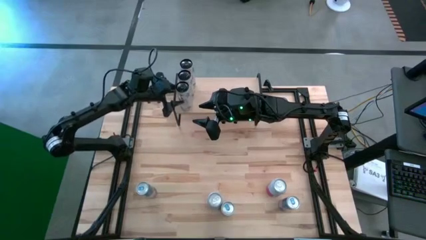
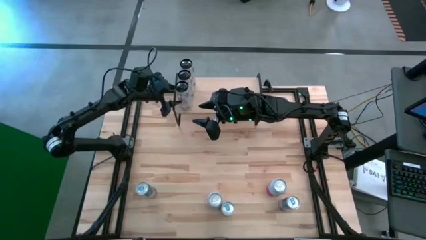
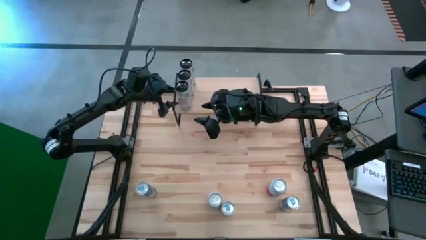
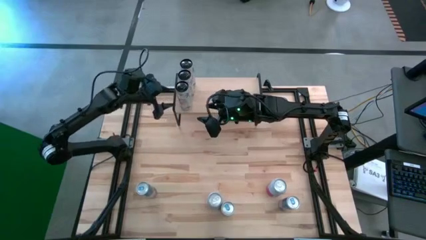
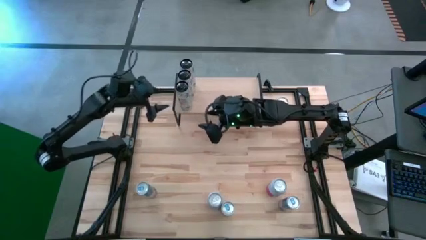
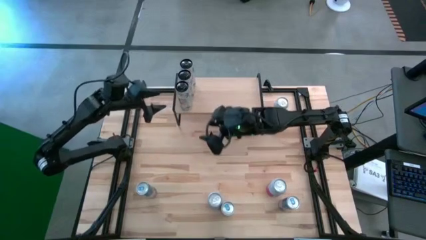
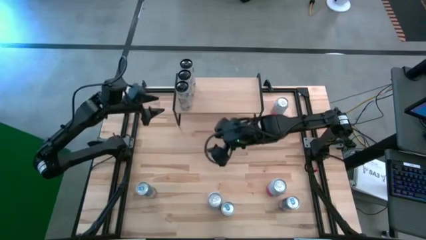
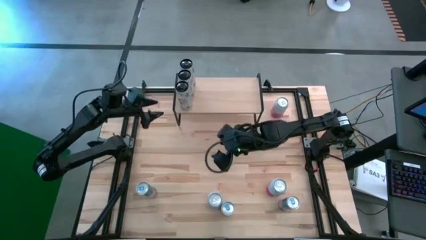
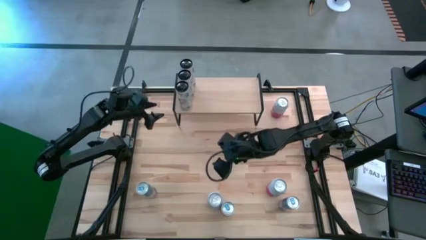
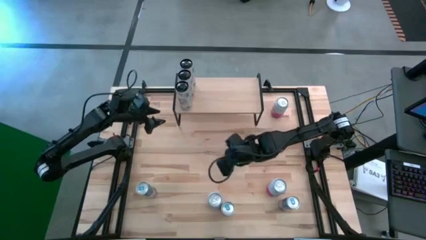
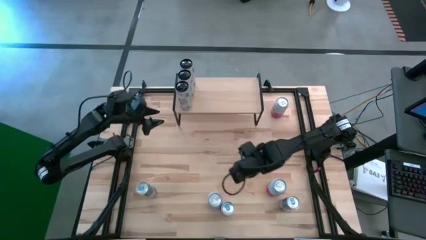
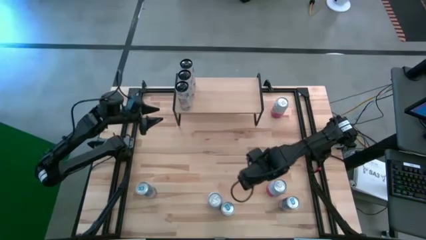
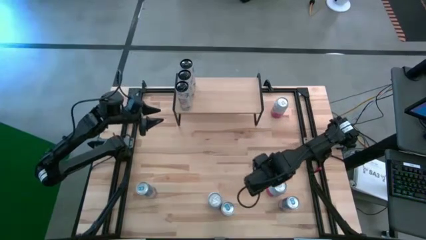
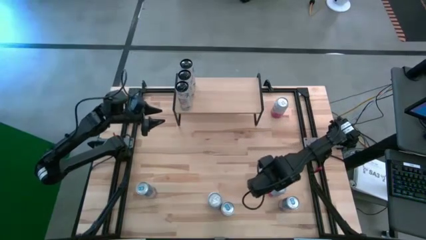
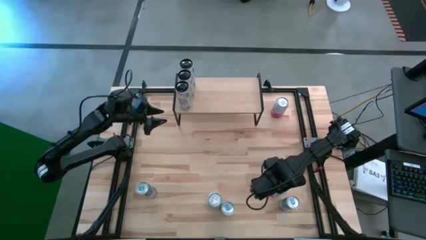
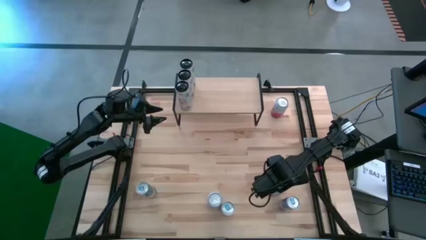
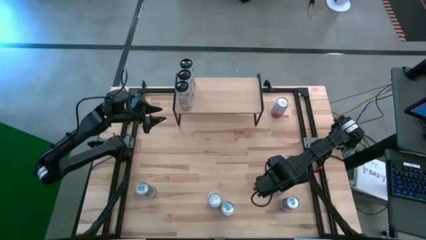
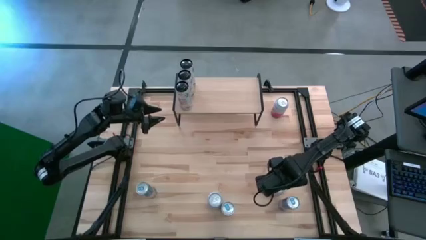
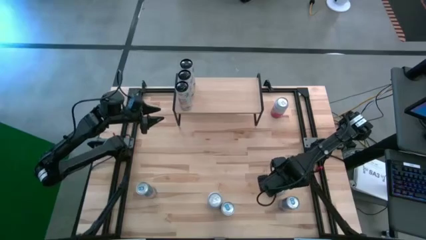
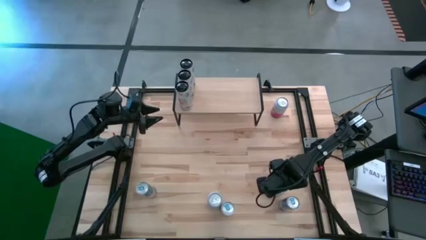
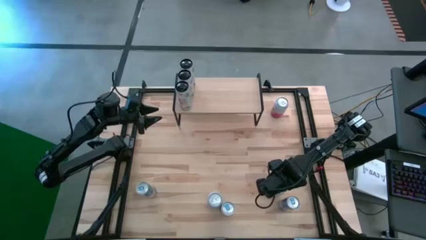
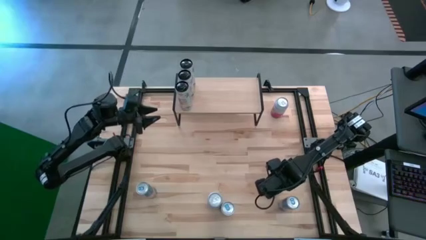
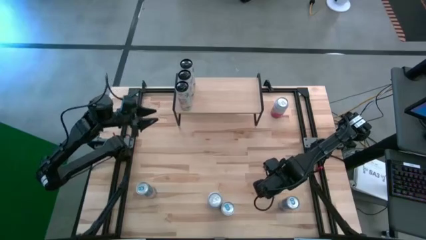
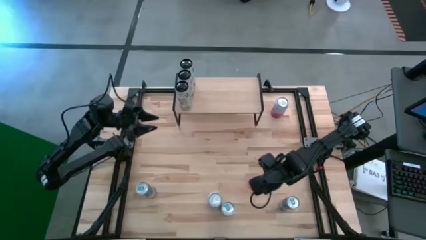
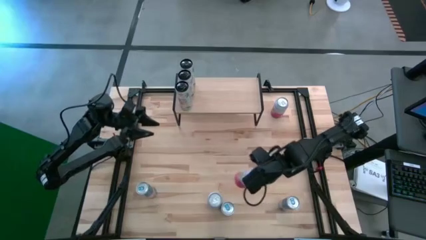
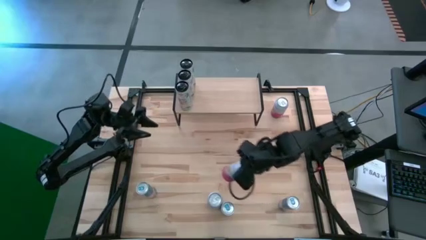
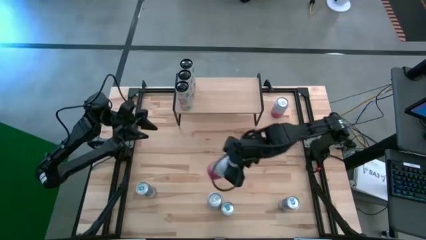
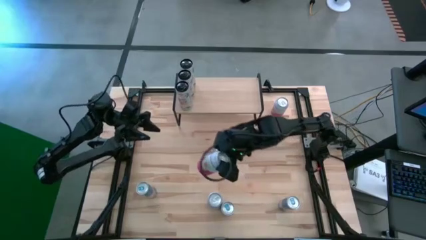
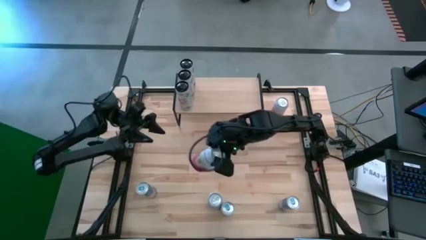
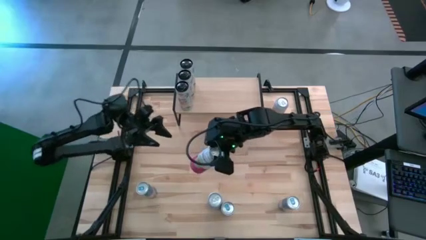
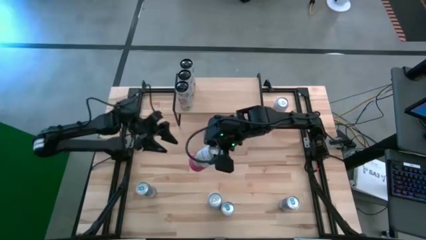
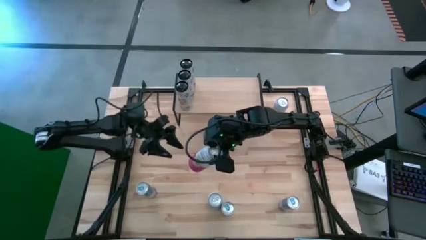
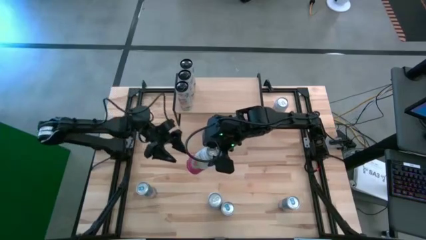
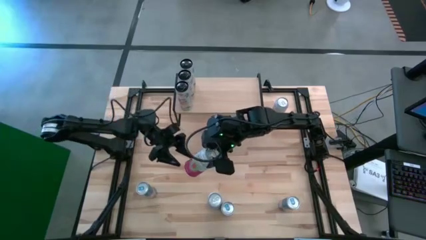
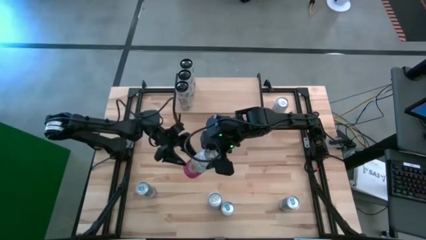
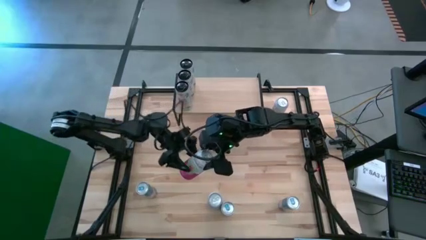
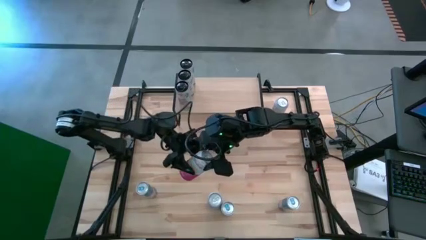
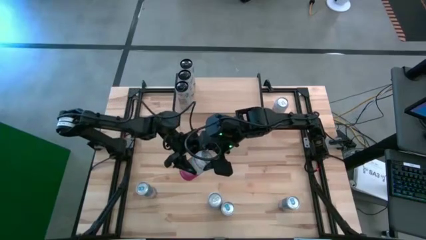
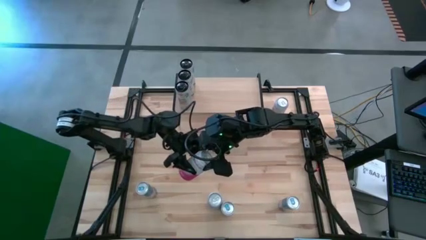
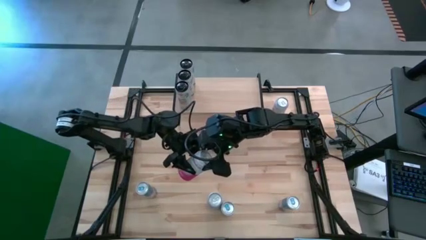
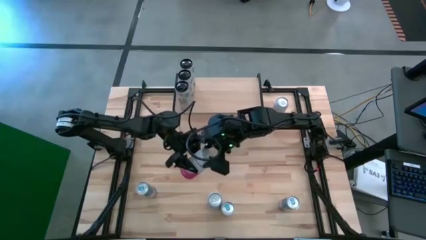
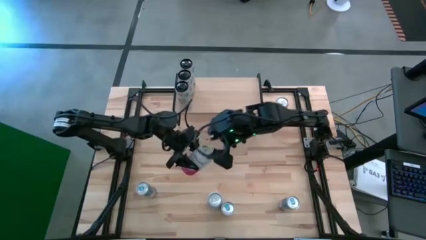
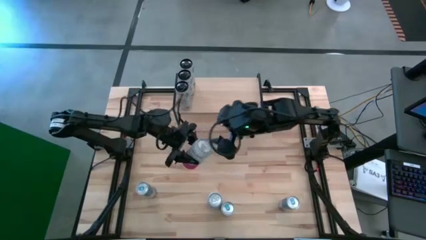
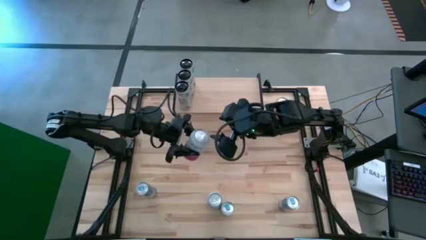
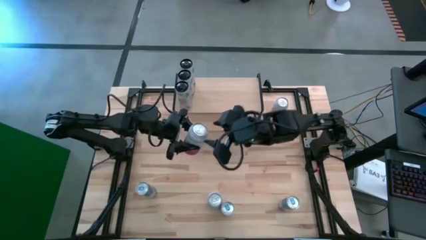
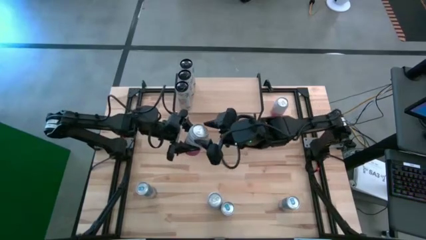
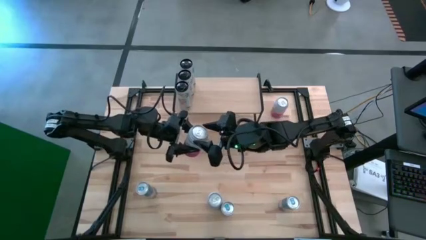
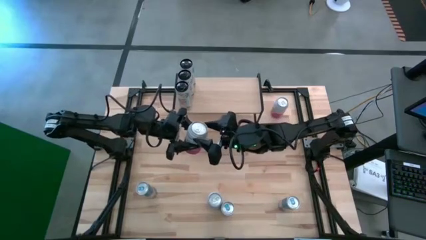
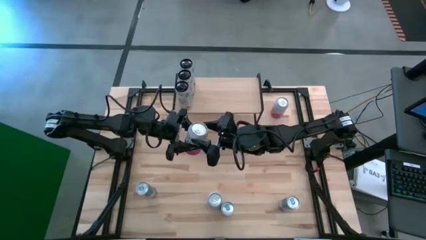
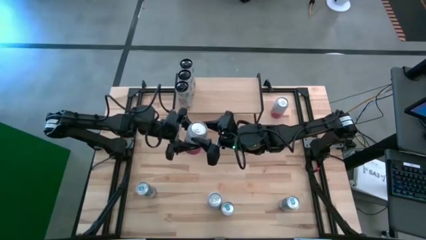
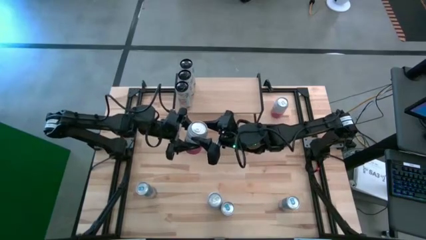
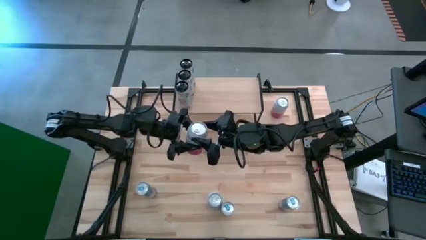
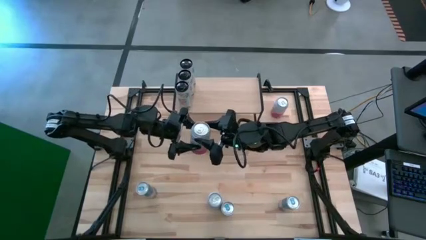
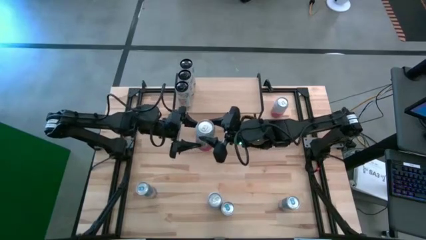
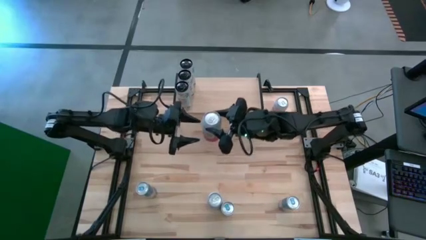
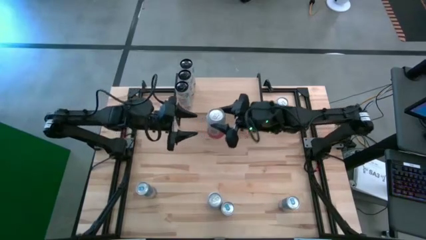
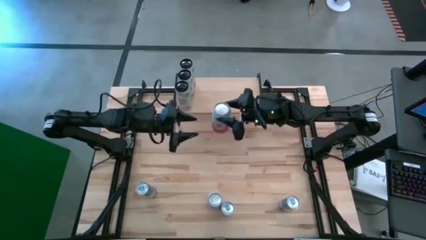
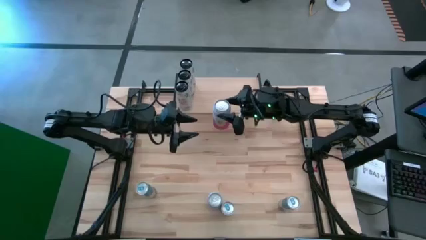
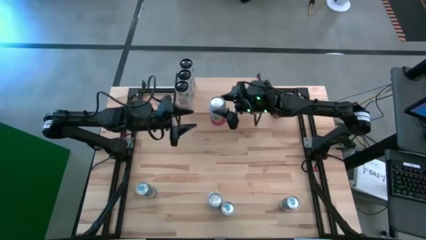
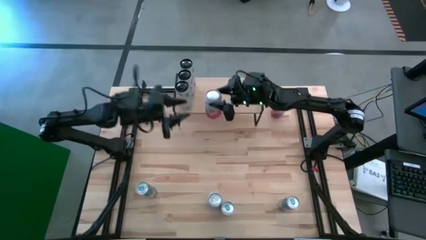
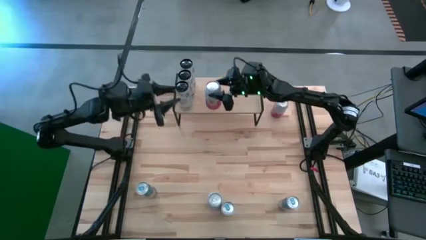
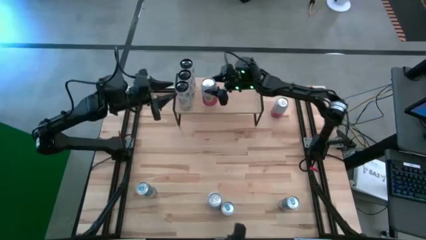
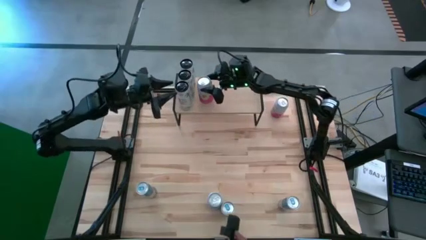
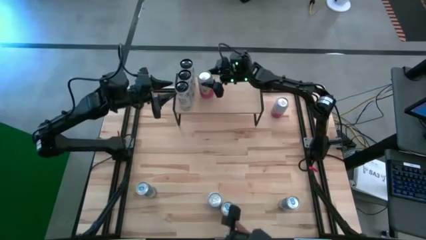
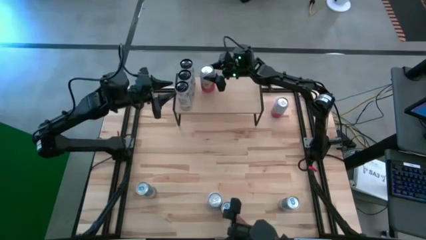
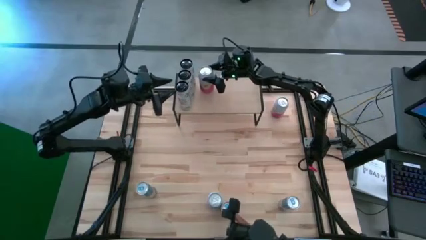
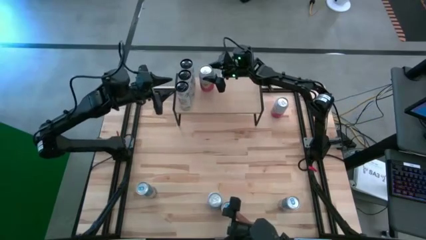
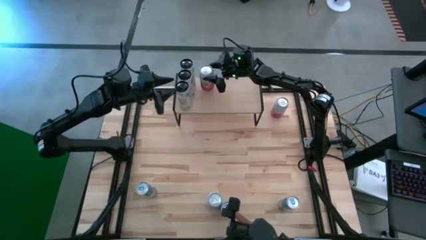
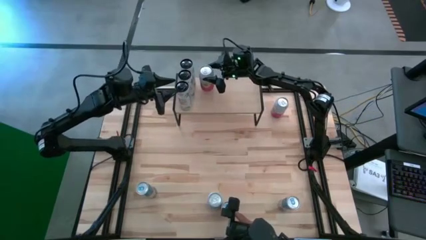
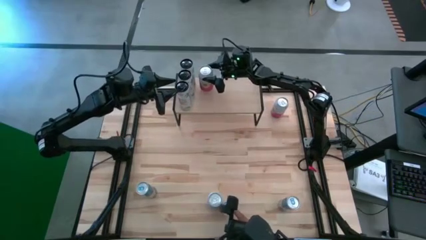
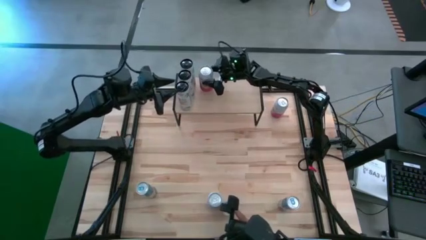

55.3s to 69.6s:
Task: Place canned beverage on shelf
Put the bottom right pink-white soda can on the shelf
